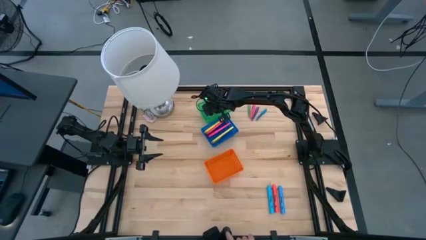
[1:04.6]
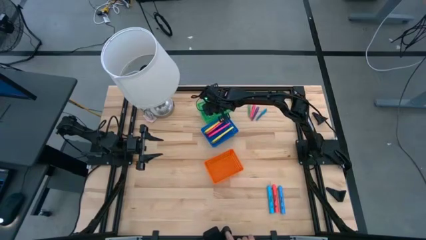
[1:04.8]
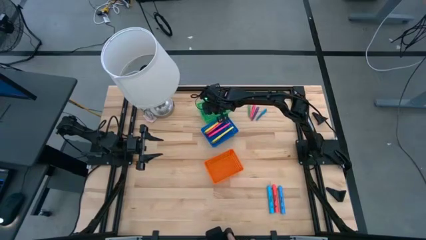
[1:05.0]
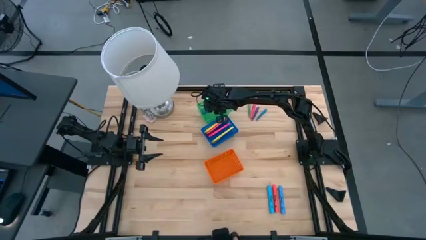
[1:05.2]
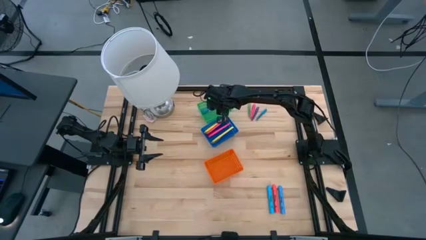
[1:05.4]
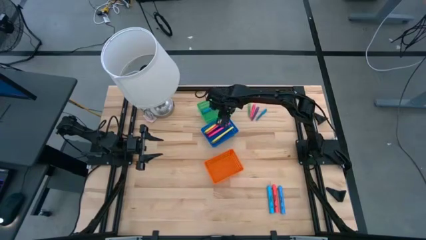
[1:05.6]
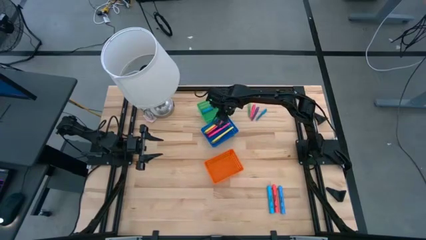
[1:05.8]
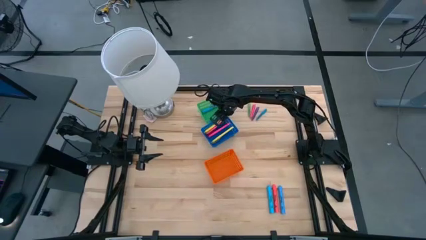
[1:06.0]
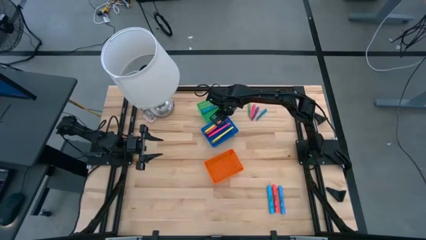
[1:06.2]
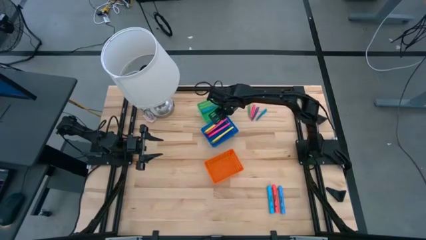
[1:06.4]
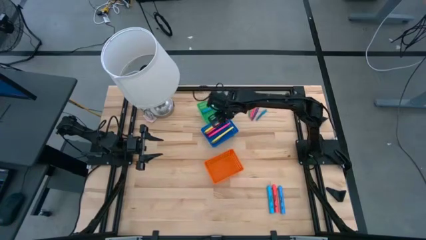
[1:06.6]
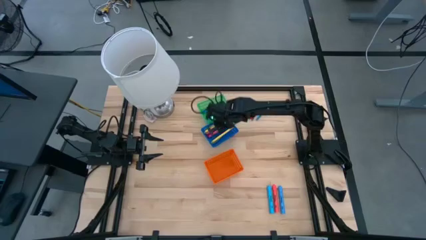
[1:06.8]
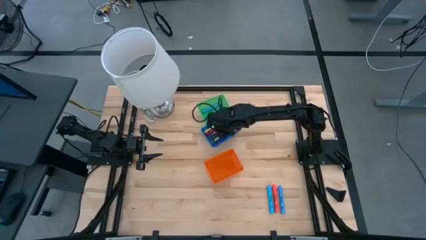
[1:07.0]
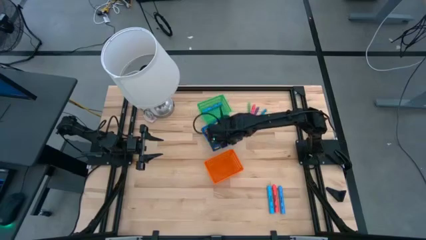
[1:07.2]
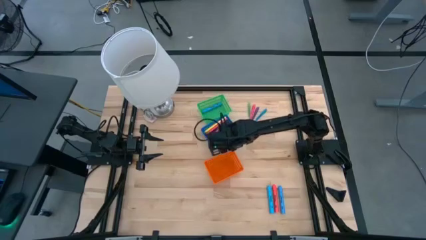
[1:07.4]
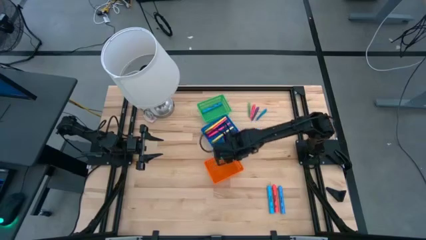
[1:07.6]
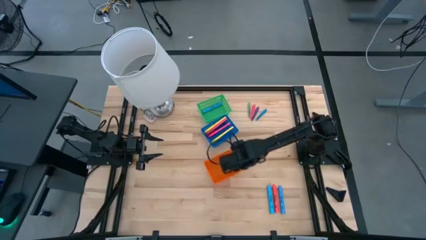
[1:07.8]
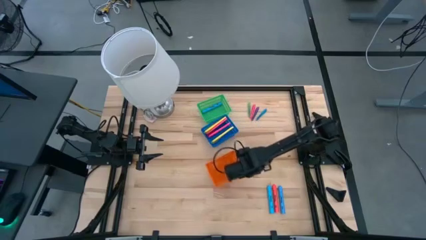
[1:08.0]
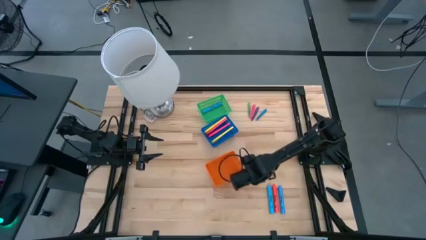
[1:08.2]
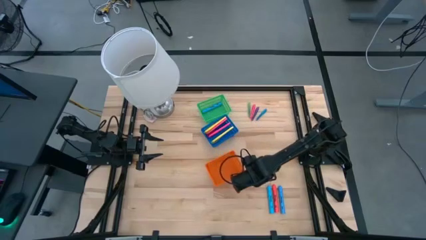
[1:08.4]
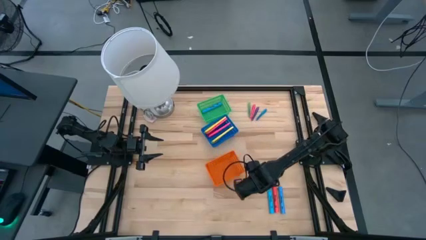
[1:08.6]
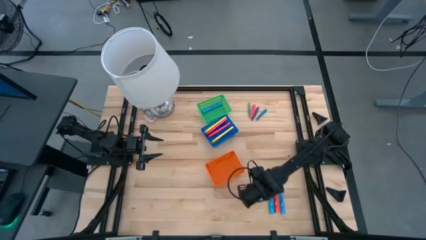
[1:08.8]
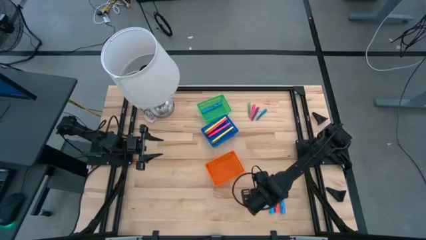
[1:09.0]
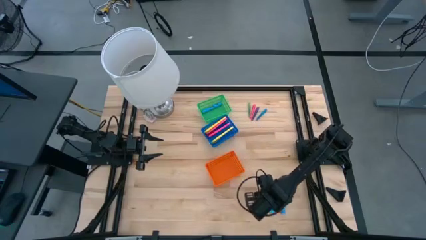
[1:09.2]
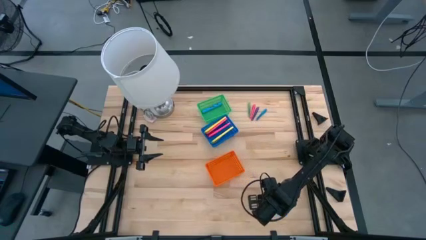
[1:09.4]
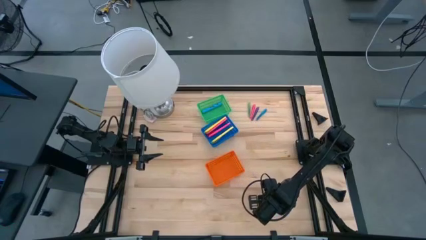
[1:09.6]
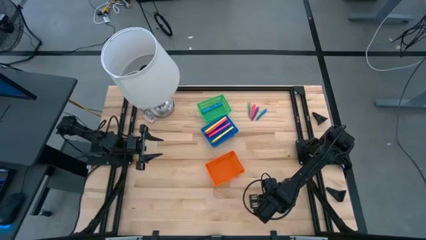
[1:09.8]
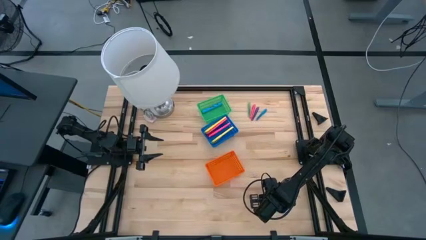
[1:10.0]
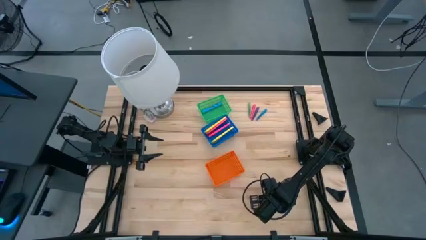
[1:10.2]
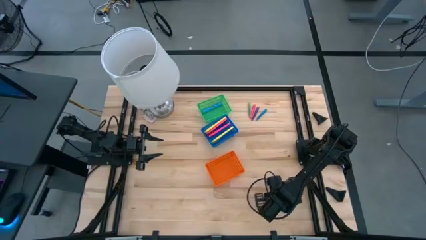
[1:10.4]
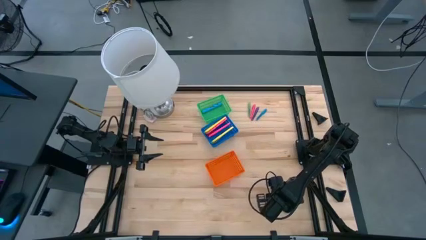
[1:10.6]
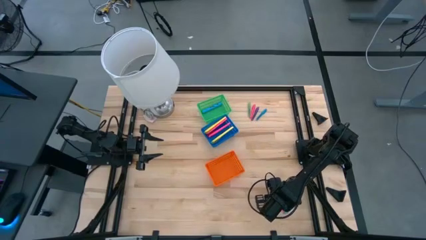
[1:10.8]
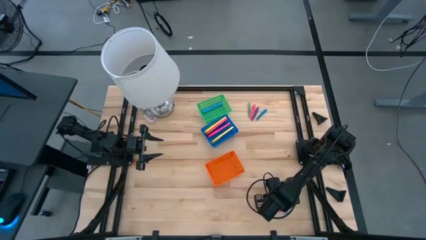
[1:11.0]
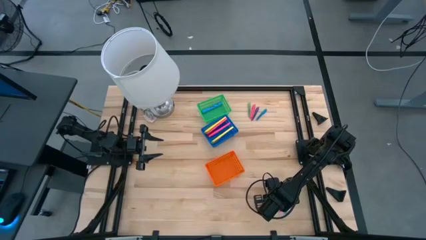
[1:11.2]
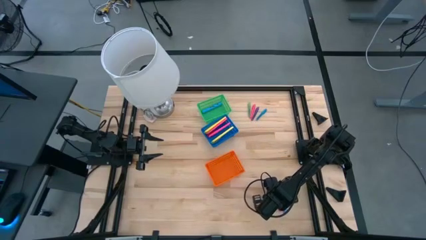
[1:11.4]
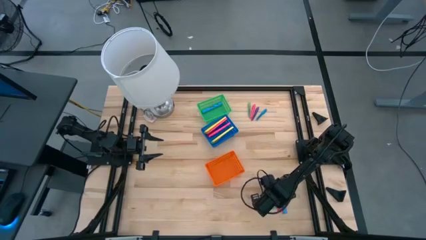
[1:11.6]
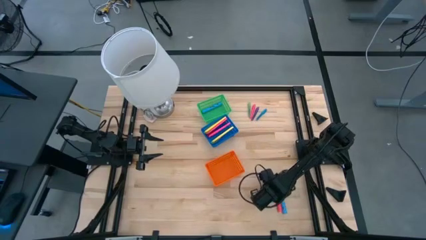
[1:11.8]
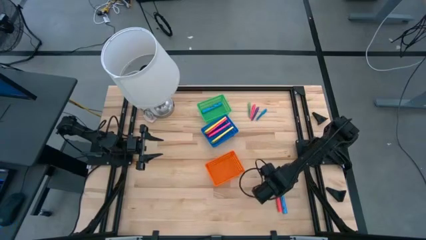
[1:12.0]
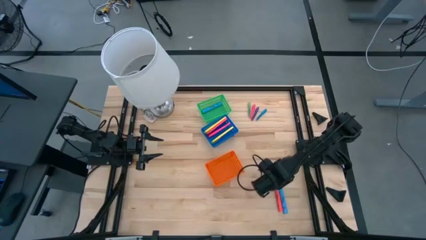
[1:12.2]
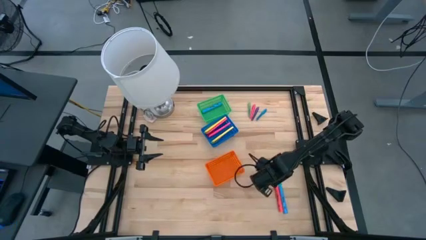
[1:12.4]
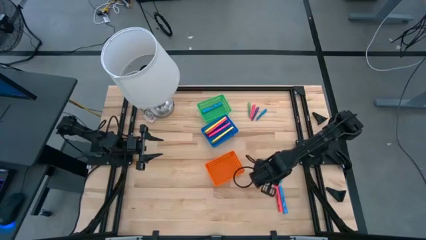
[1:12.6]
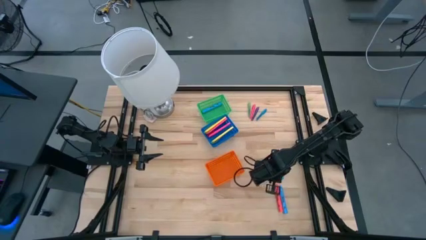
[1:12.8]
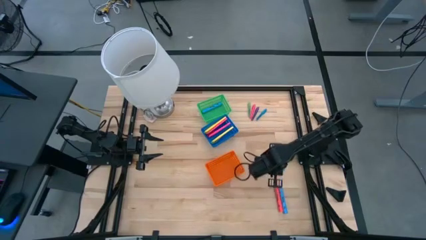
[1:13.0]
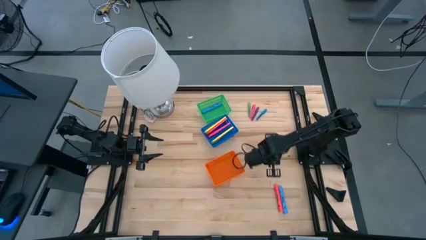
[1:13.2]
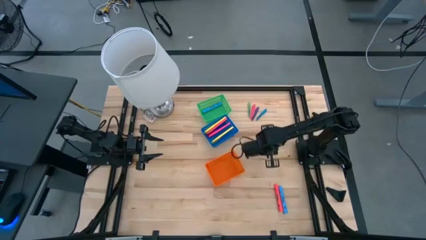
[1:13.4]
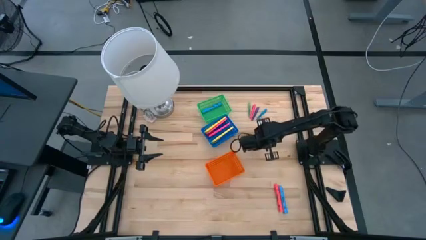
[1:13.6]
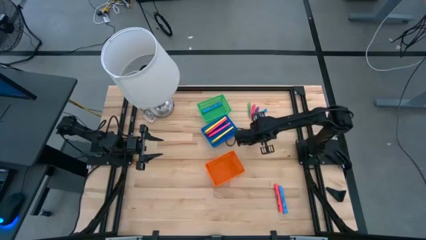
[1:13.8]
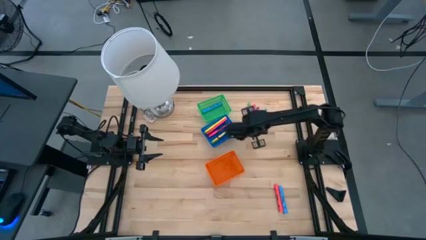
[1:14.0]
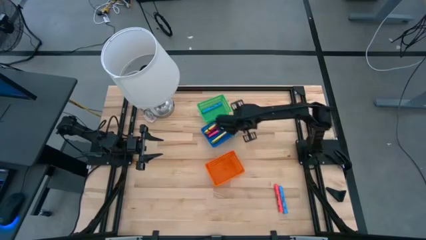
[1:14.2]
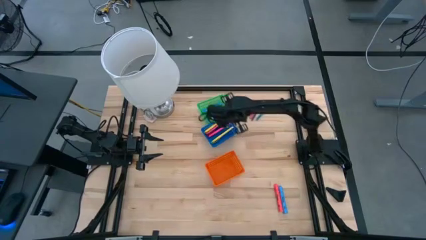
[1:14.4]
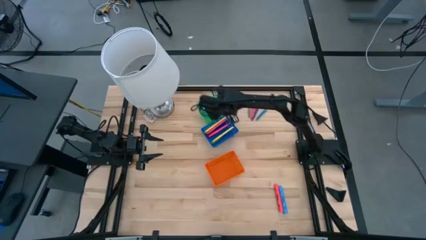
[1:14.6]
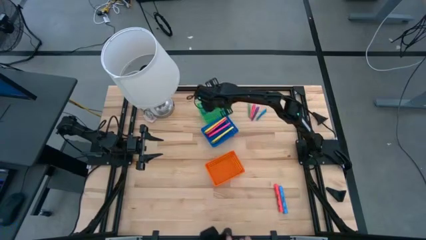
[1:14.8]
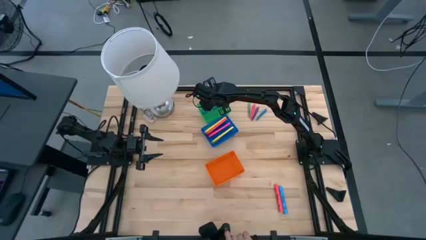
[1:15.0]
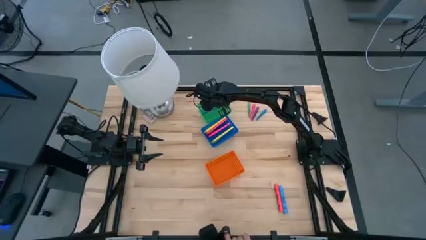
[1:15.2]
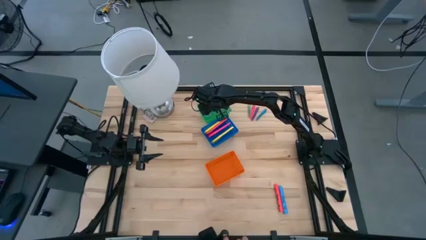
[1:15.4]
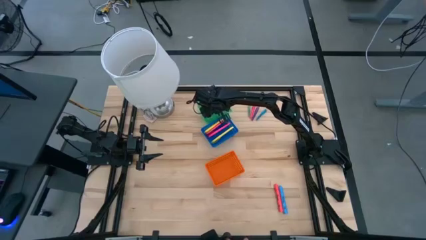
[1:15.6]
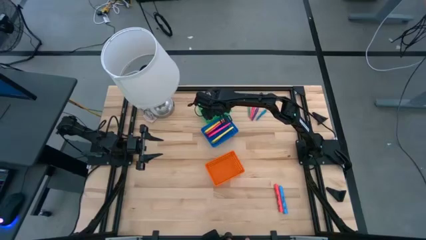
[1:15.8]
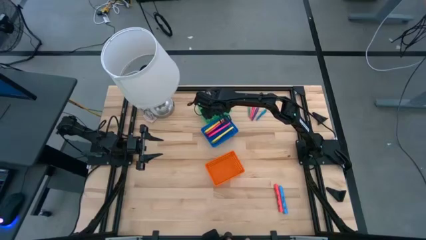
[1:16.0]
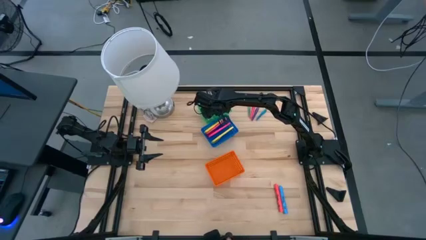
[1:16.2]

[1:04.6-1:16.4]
Task: Pick & Place Markers
Put the left blue highlighter pen into the green bin

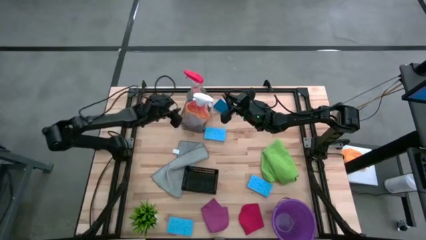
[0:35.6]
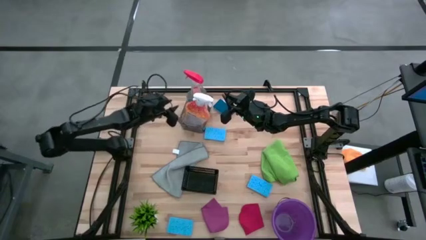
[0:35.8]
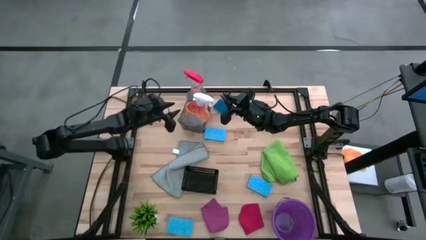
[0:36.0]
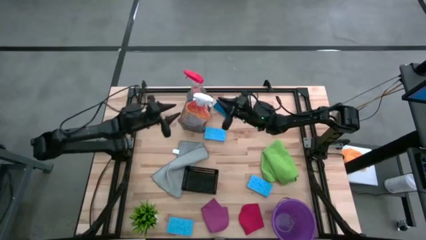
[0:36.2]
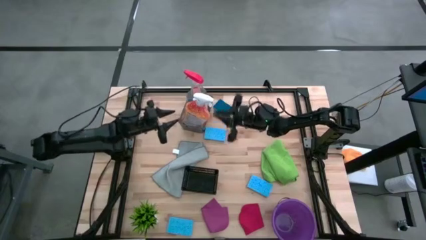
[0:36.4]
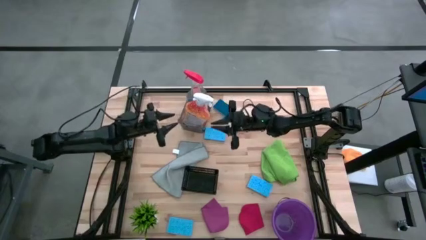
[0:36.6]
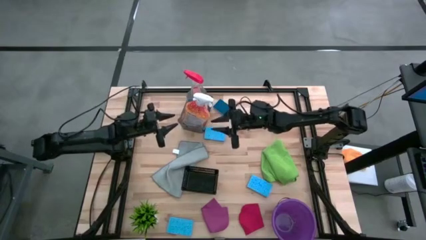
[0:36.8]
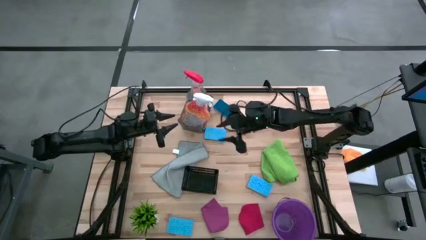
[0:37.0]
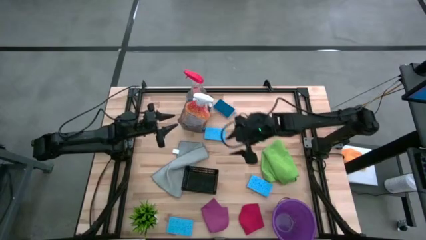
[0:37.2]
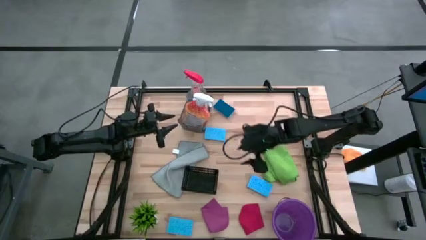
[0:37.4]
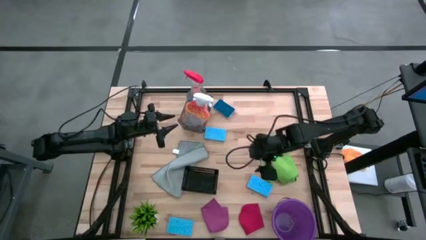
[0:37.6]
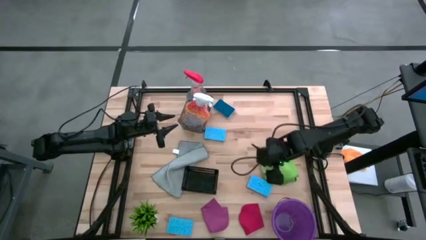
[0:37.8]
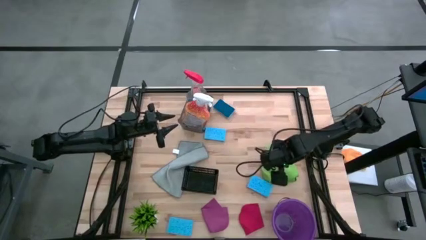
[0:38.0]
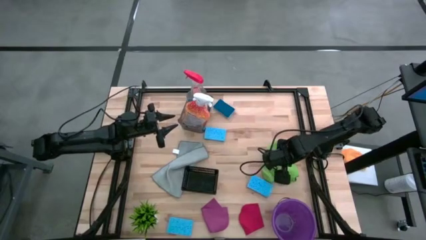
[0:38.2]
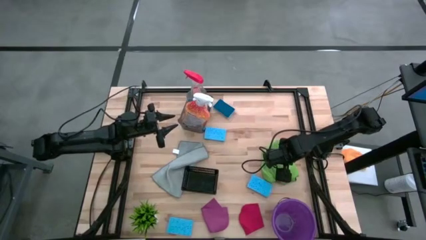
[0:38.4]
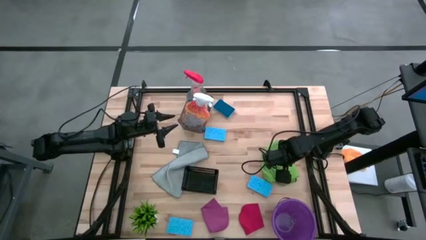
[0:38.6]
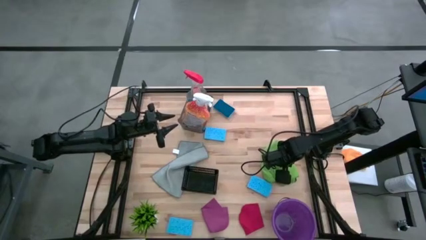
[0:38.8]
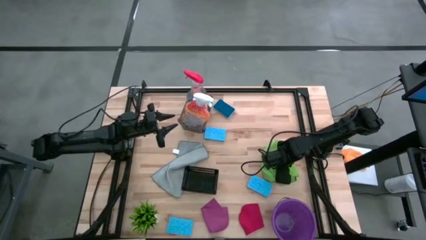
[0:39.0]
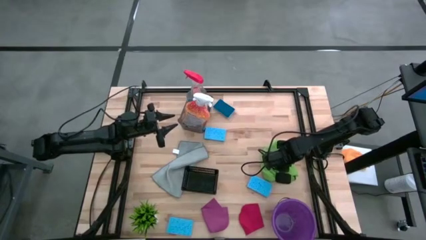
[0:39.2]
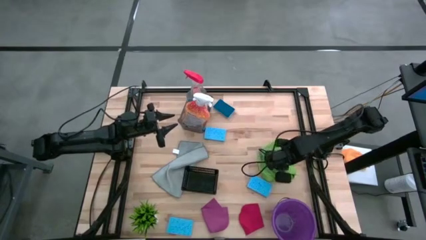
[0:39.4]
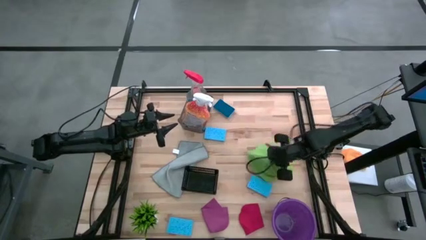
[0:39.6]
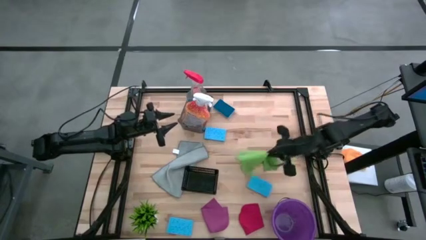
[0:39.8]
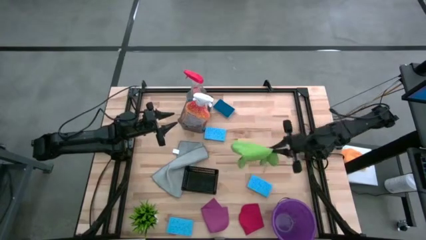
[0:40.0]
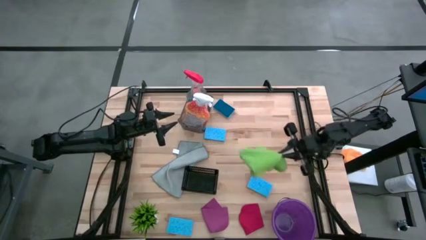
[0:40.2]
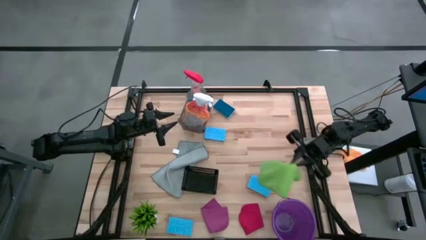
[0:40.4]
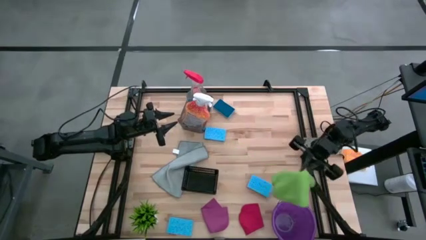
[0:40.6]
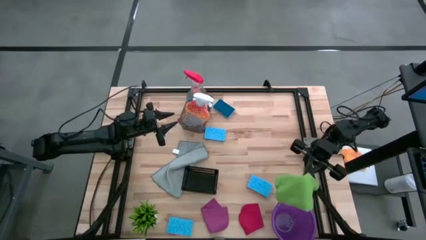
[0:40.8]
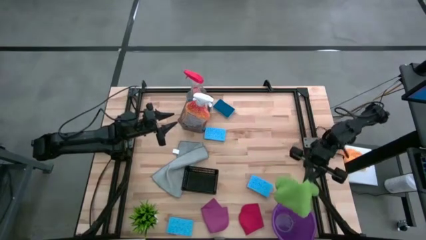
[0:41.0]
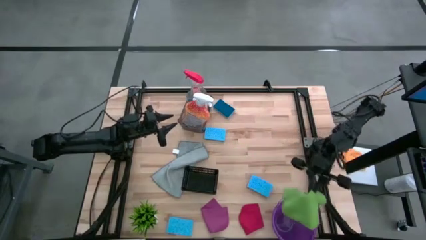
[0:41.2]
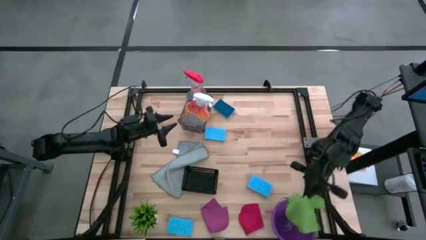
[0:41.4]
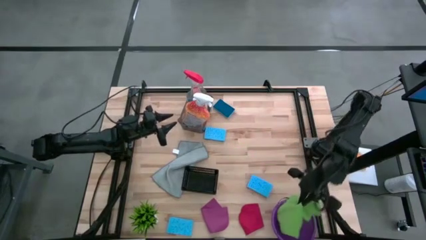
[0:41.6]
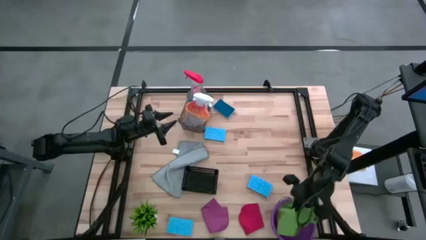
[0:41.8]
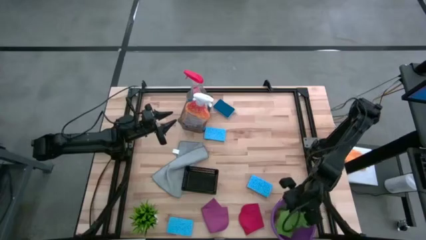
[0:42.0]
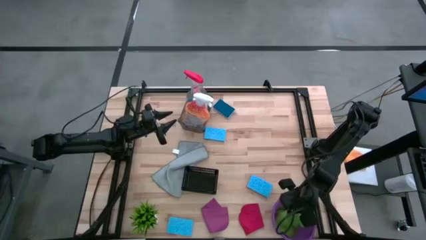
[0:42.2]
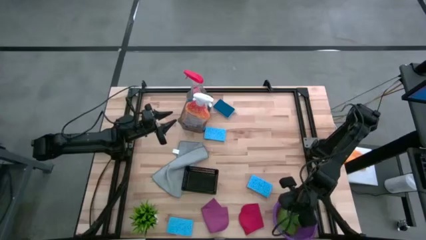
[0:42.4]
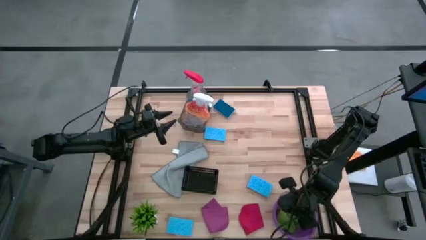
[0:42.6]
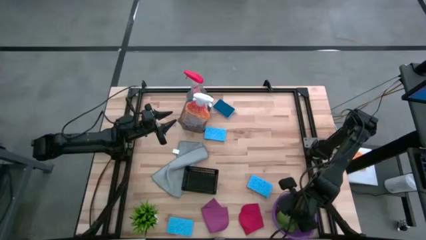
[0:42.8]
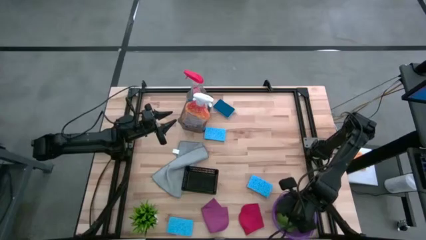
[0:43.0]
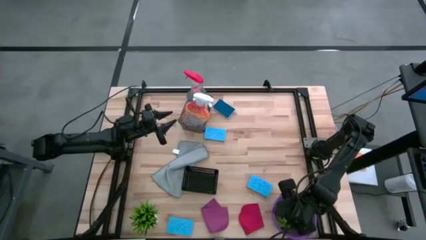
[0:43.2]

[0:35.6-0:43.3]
Task: Pick & Place Kitchen Items
Put the green towel into the violet bucket
